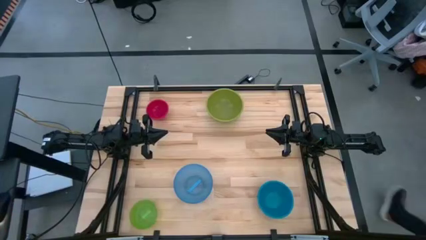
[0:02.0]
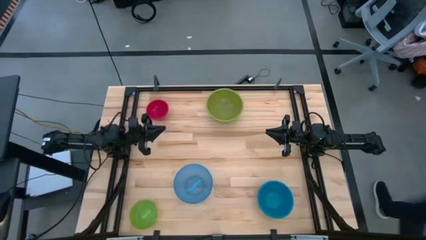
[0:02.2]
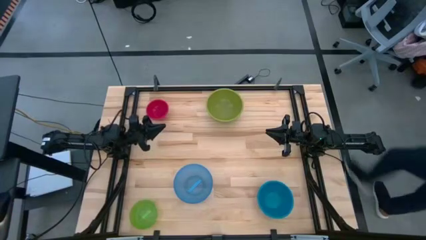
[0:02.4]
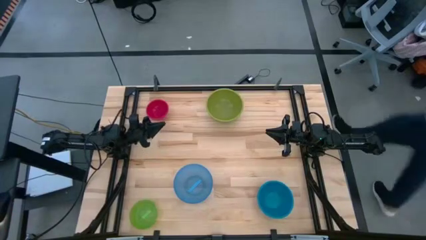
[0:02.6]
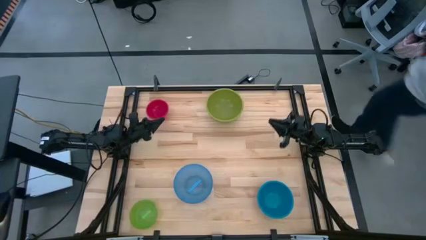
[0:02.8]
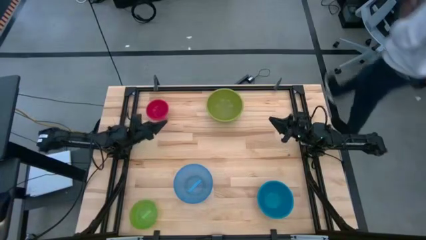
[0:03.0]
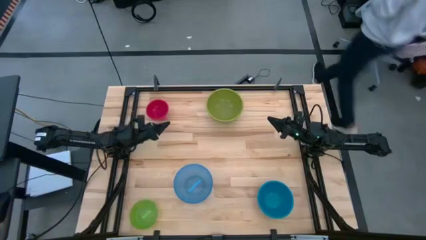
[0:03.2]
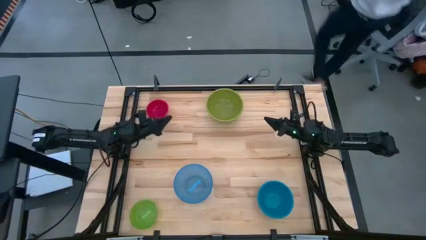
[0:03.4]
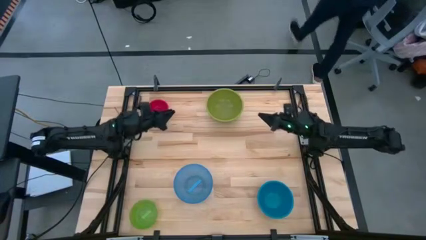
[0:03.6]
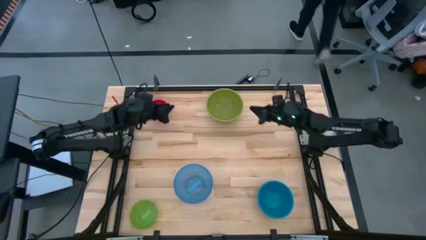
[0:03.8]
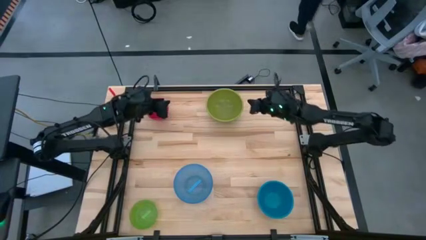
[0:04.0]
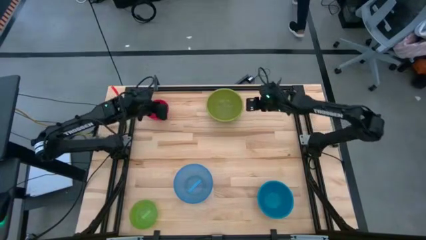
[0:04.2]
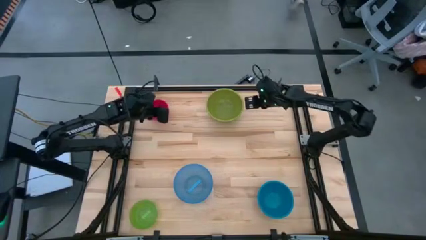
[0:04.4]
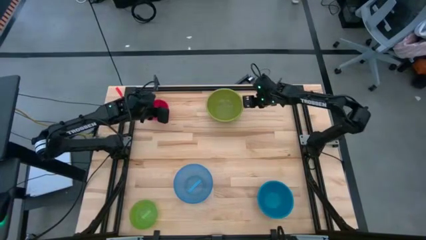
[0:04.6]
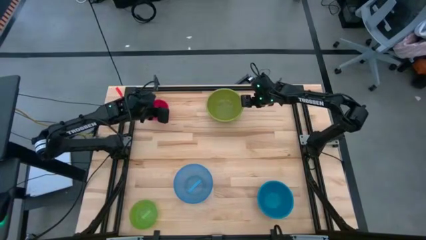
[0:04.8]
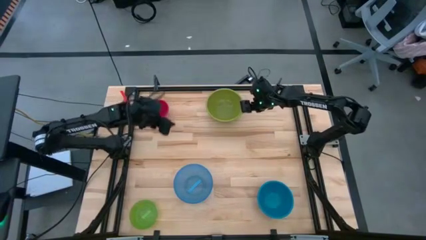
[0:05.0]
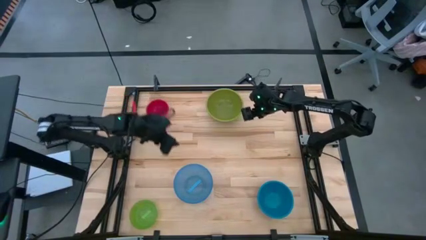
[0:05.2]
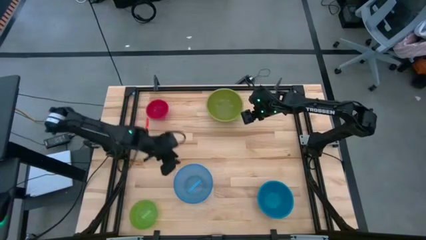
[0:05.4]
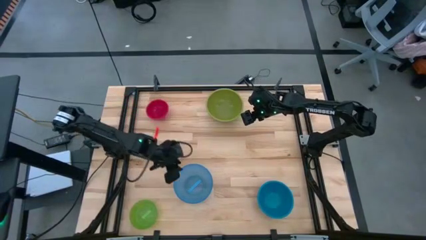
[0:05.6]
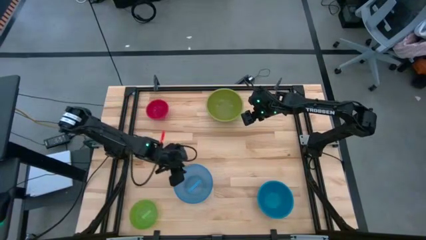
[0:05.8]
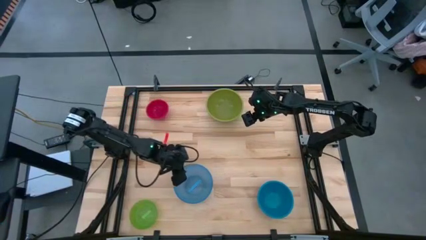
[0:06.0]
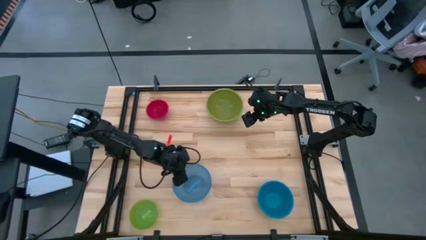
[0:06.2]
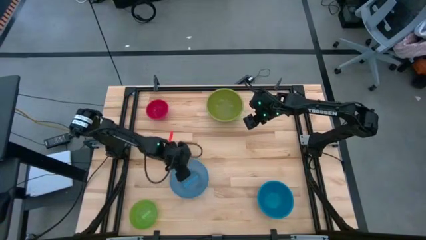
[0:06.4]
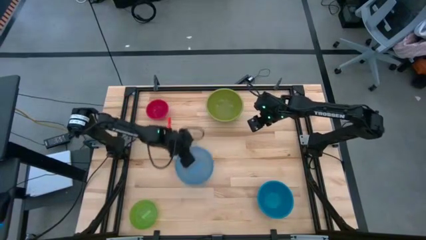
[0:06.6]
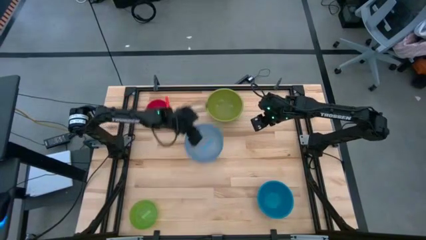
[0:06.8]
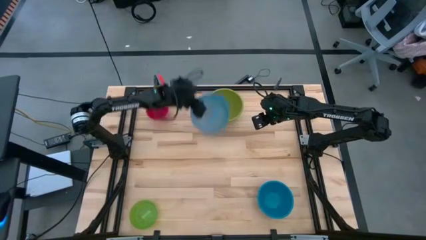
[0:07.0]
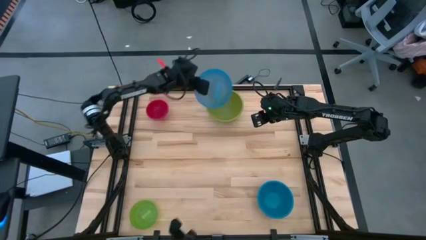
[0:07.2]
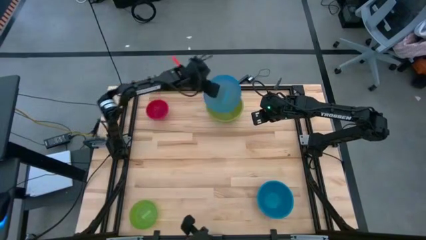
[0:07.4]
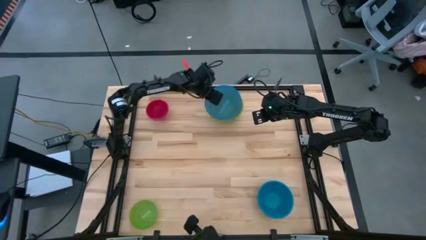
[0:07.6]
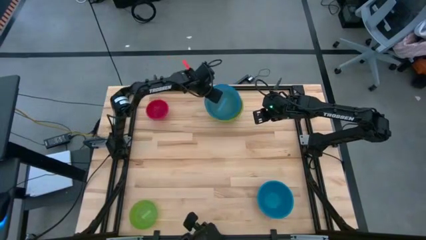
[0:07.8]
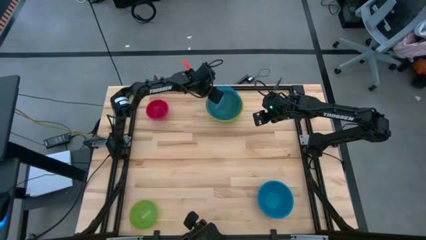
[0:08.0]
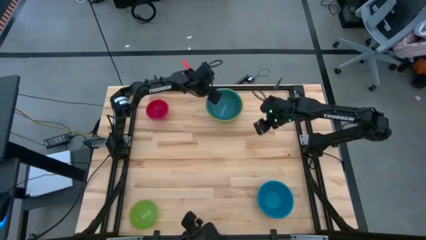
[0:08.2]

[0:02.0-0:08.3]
Stack the transparent blue bowl on top of the green bowl on the table

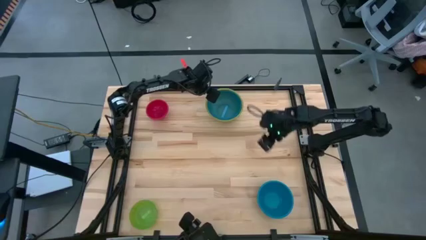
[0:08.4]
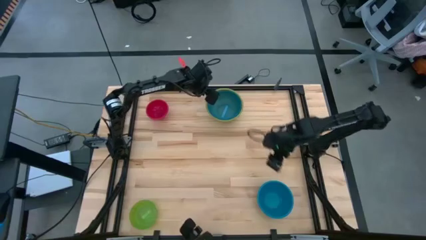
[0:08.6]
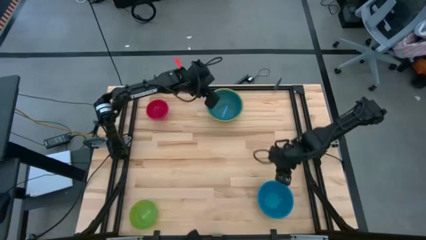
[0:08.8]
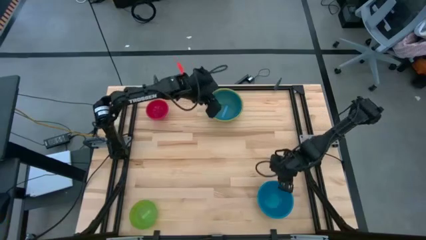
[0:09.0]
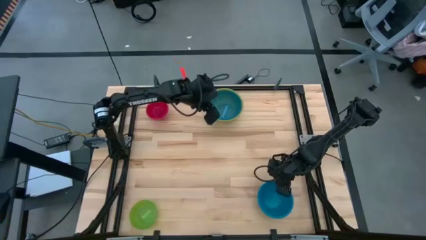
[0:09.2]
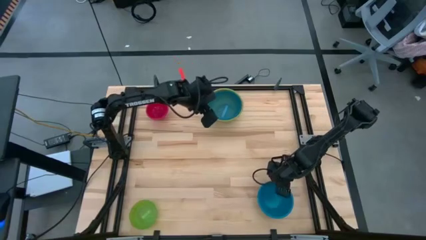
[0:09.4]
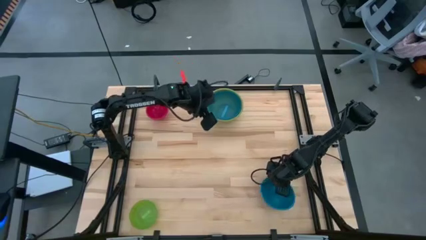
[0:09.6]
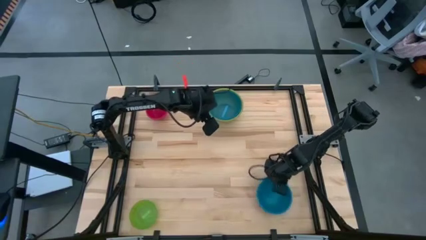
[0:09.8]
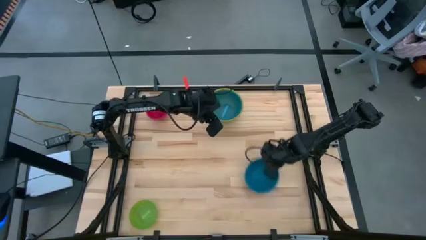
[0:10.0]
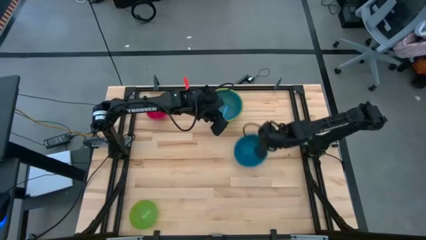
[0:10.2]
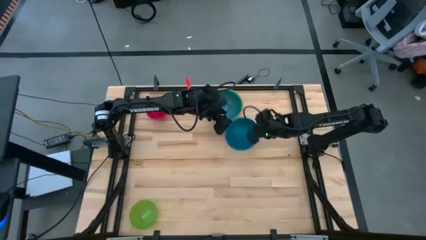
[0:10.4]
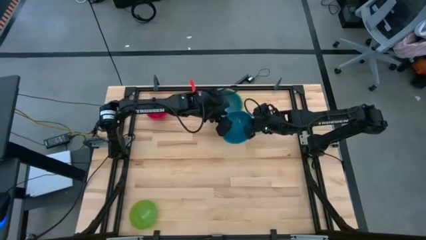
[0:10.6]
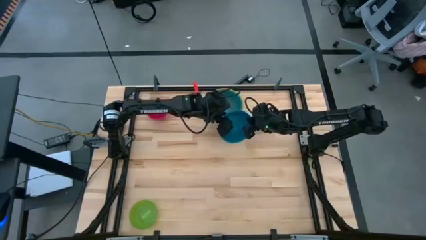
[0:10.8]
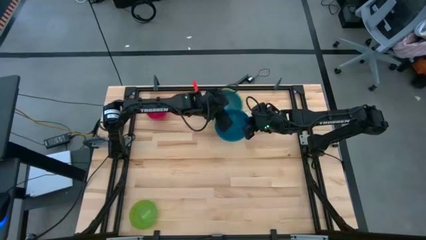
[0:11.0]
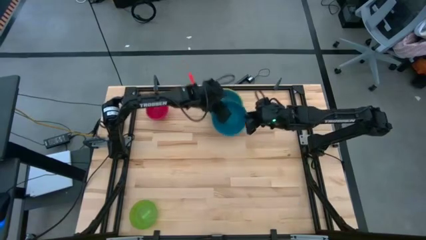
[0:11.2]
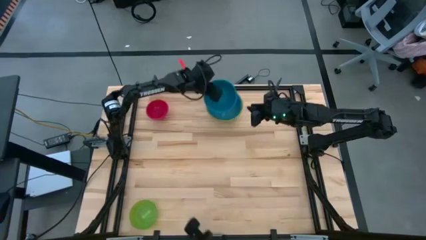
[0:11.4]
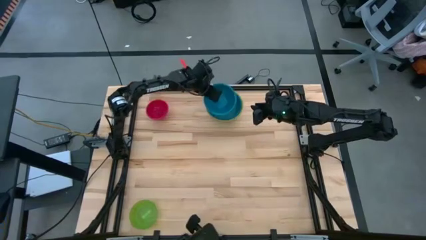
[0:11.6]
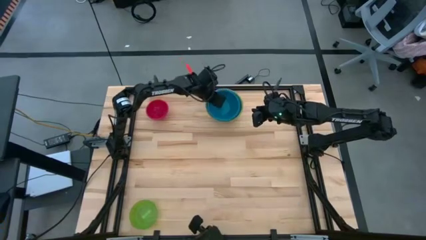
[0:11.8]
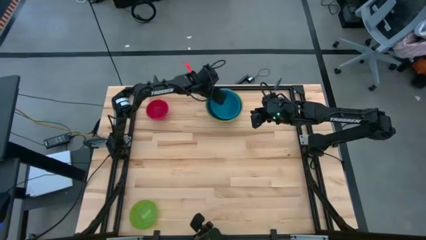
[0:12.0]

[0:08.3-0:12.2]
Stack the blue bowl on top of the transparent blue bowl on the table

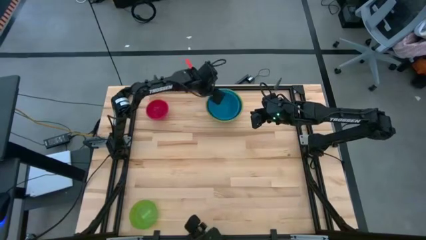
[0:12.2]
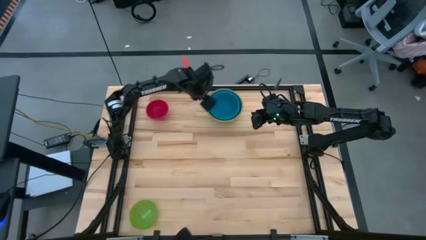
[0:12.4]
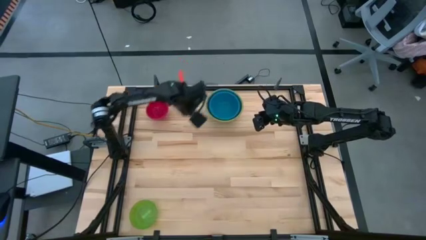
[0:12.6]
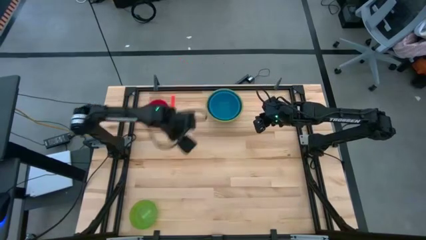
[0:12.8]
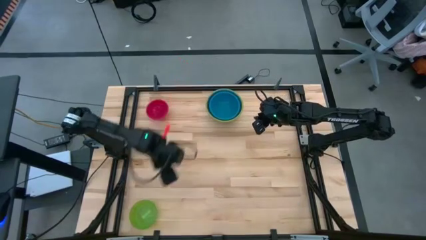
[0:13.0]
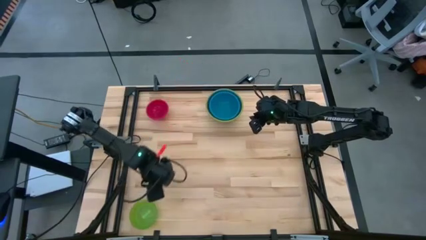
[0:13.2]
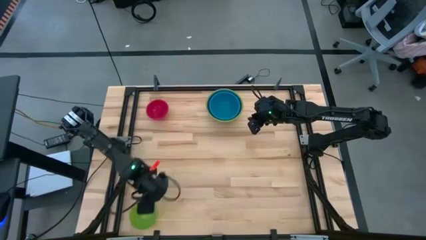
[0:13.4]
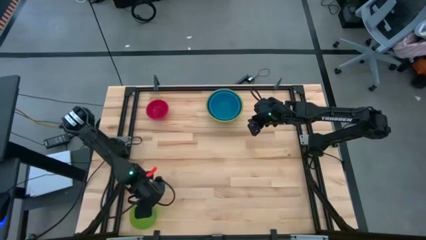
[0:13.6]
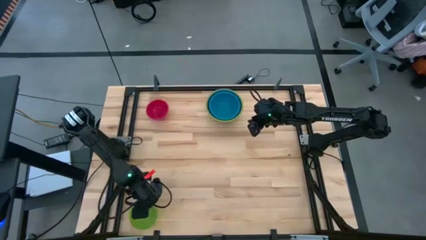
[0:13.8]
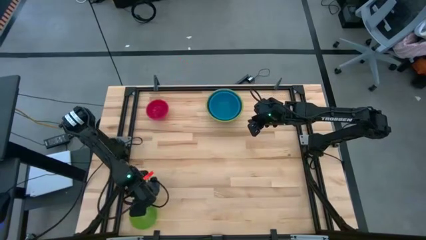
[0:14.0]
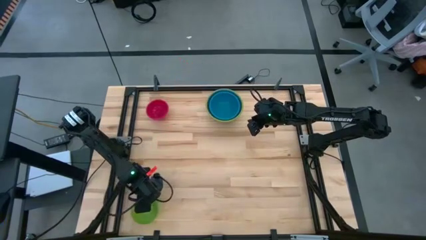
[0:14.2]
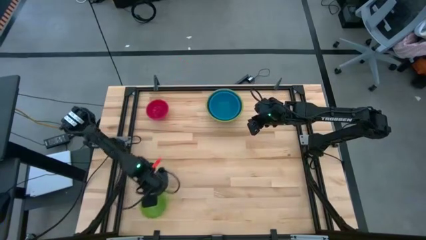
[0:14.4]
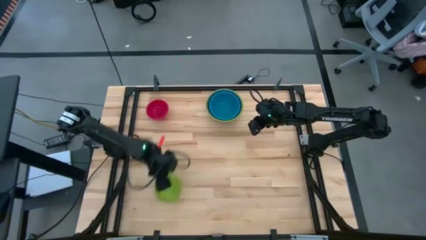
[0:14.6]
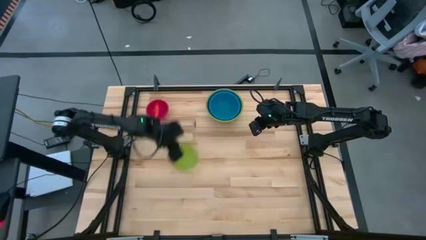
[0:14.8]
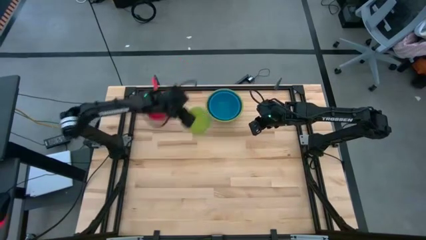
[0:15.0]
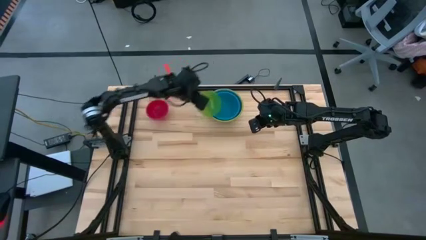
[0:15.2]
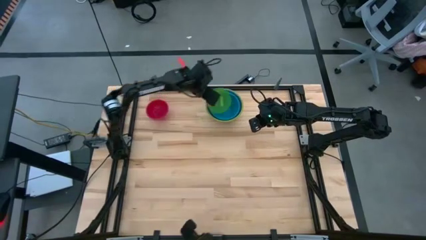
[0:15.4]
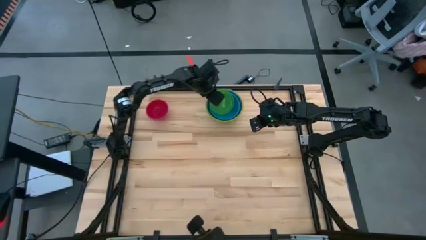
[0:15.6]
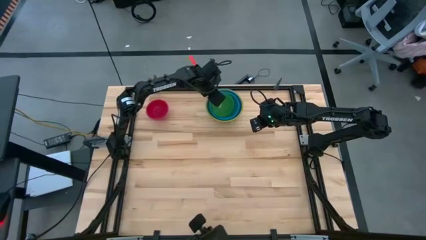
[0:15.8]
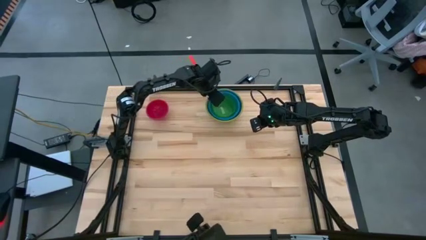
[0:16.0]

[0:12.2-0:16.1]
Stack the transparent green bowl on top of the blue bowl on the table
